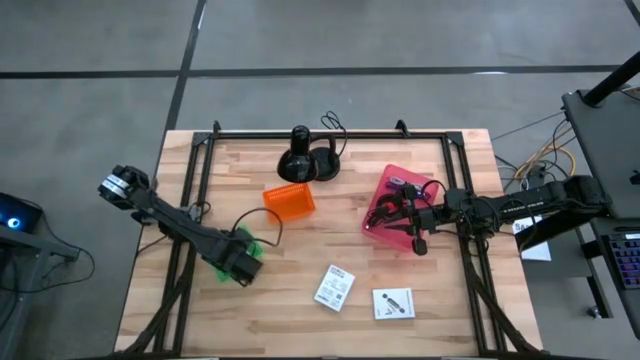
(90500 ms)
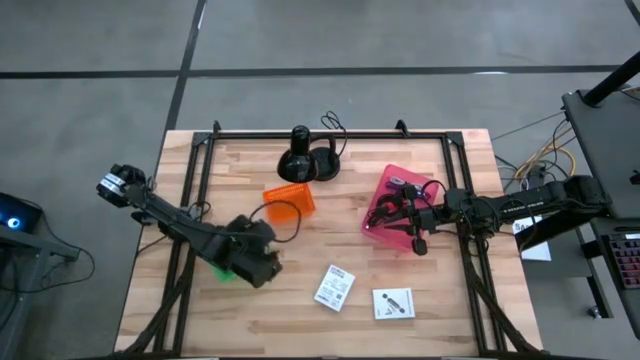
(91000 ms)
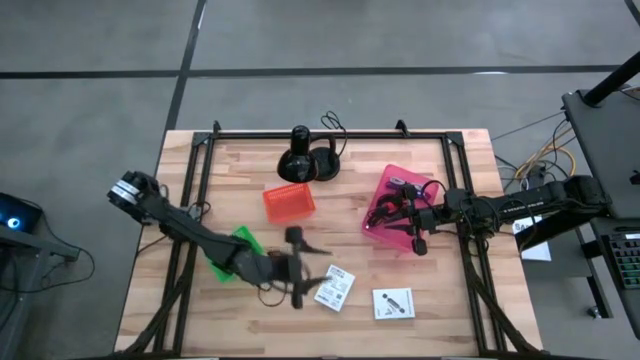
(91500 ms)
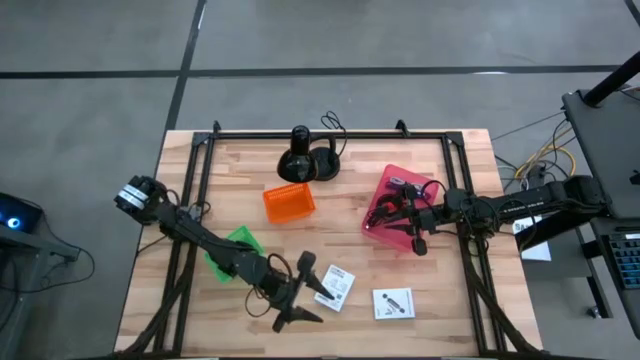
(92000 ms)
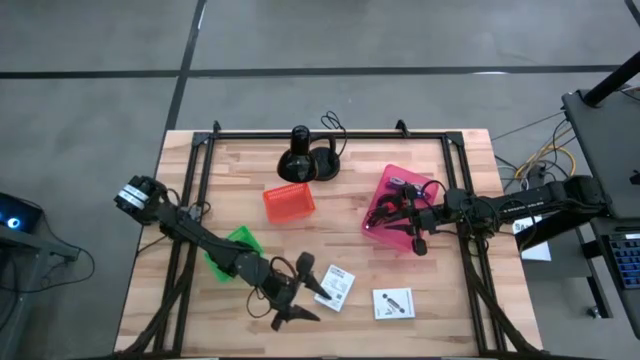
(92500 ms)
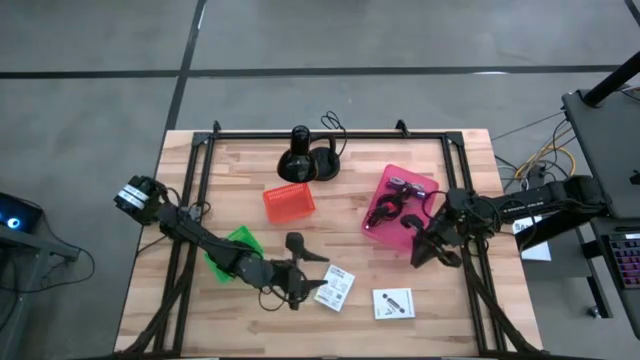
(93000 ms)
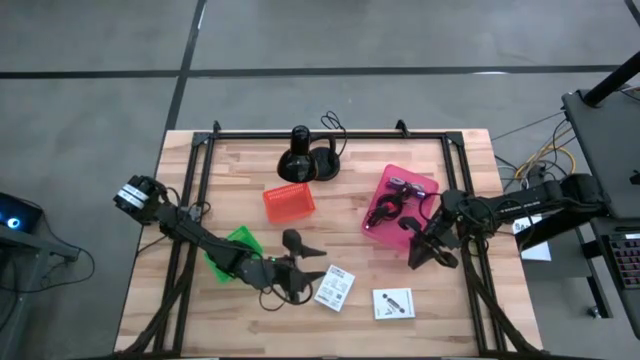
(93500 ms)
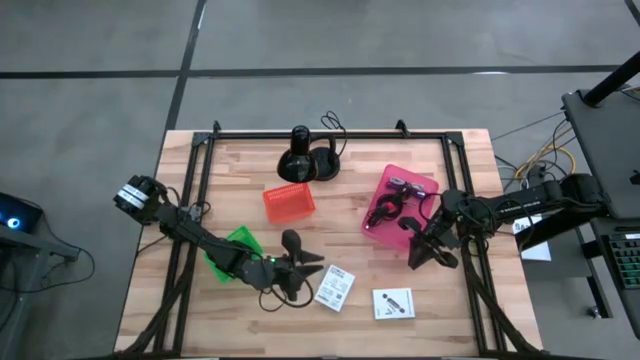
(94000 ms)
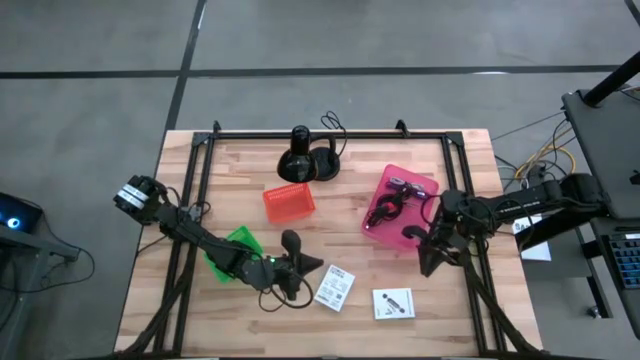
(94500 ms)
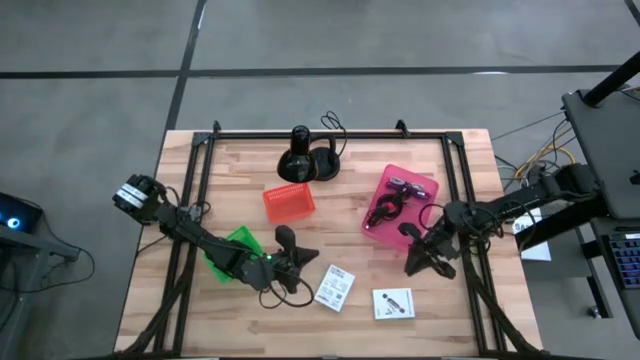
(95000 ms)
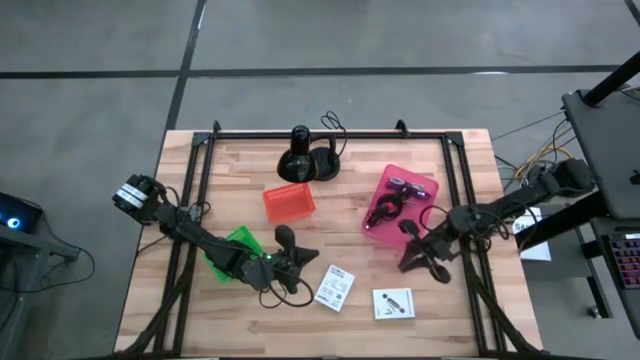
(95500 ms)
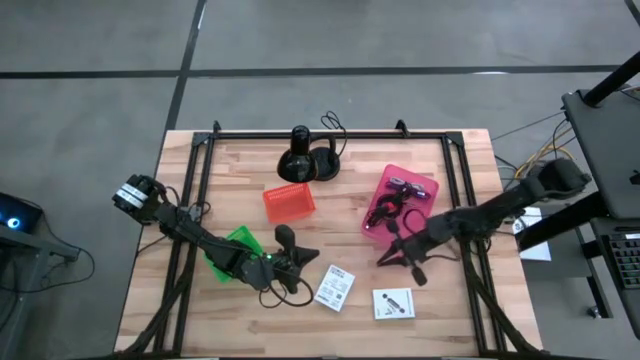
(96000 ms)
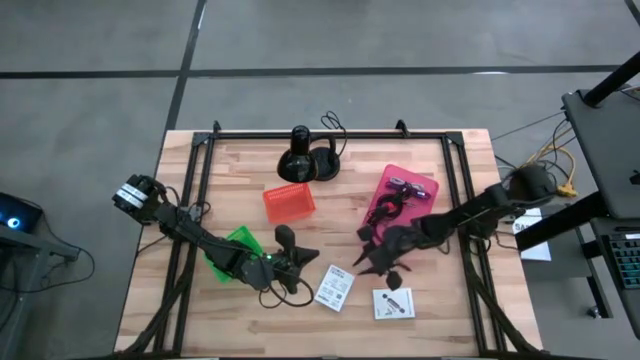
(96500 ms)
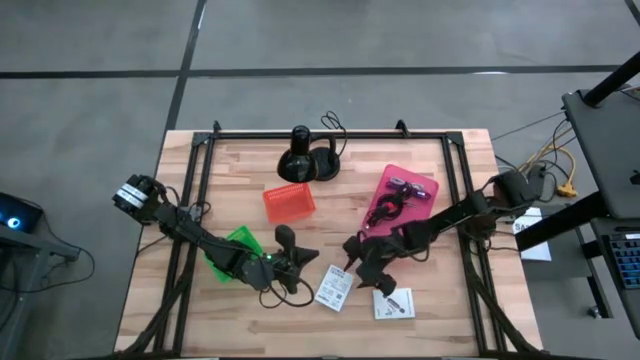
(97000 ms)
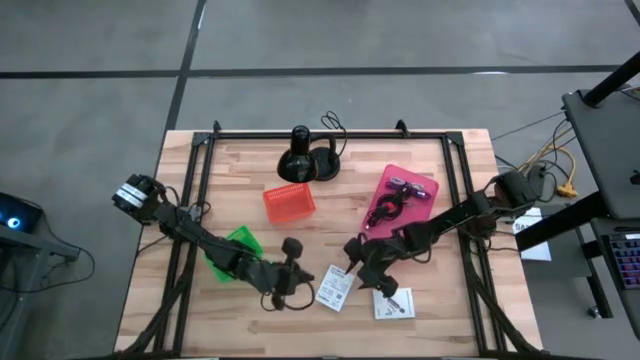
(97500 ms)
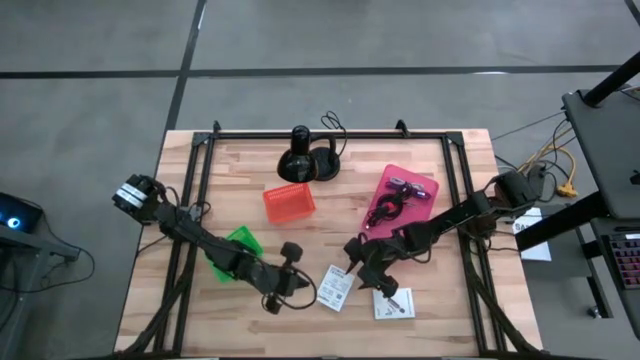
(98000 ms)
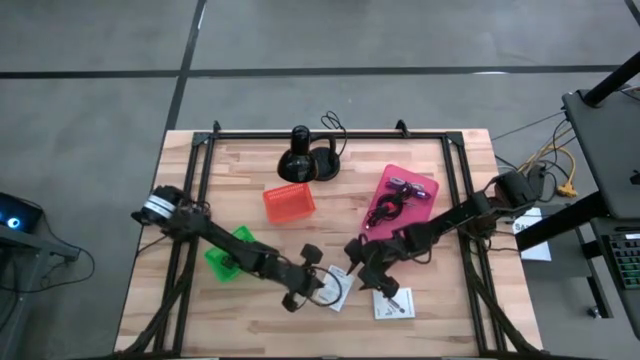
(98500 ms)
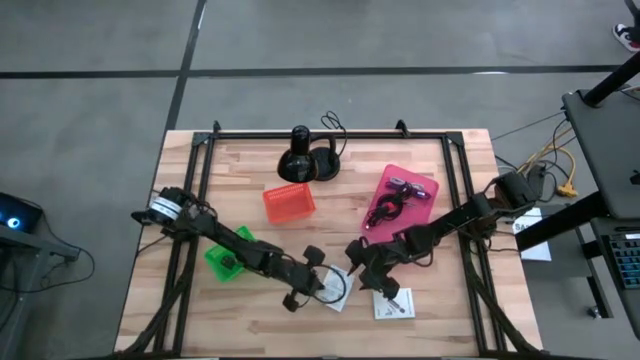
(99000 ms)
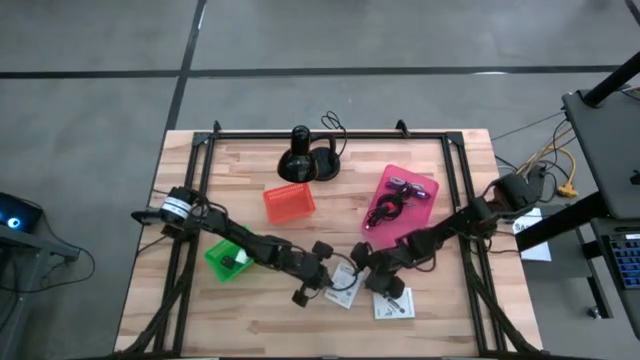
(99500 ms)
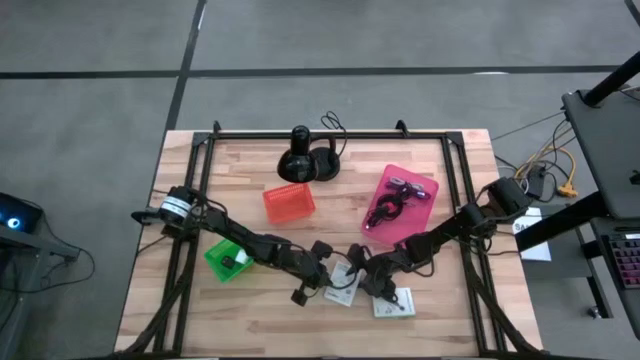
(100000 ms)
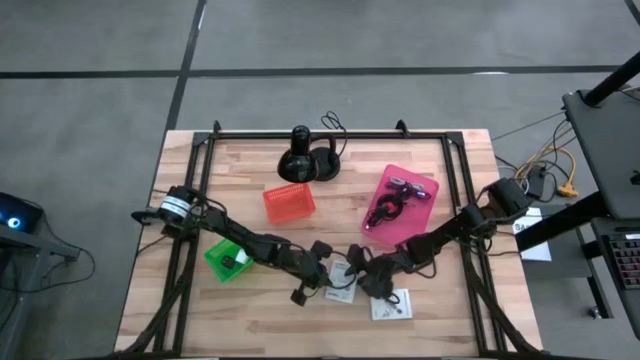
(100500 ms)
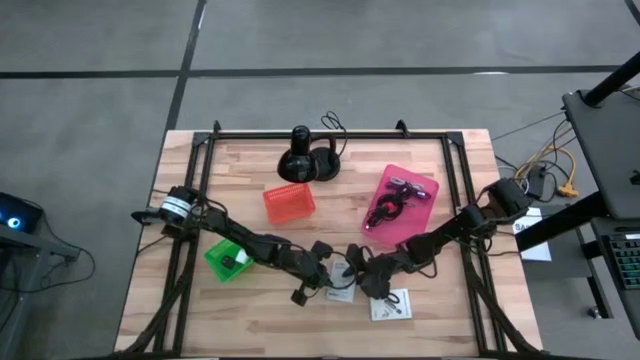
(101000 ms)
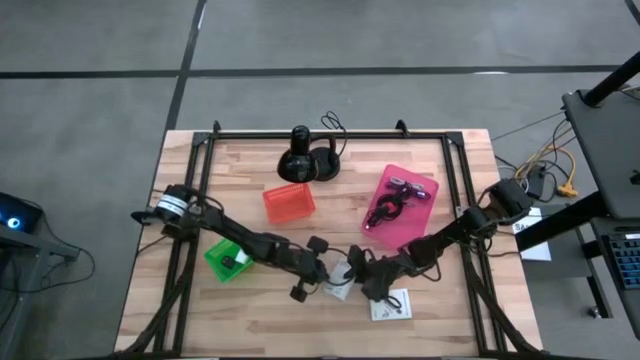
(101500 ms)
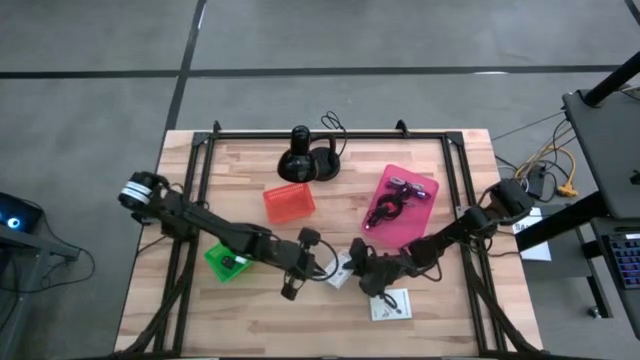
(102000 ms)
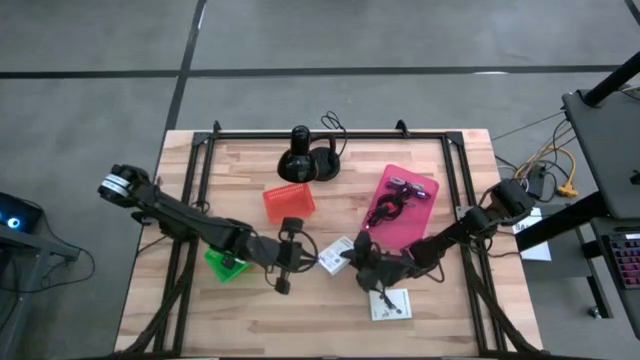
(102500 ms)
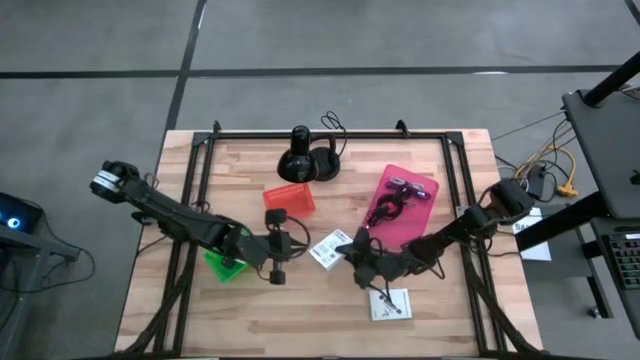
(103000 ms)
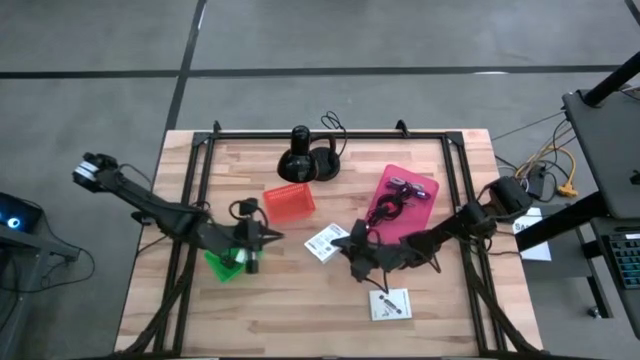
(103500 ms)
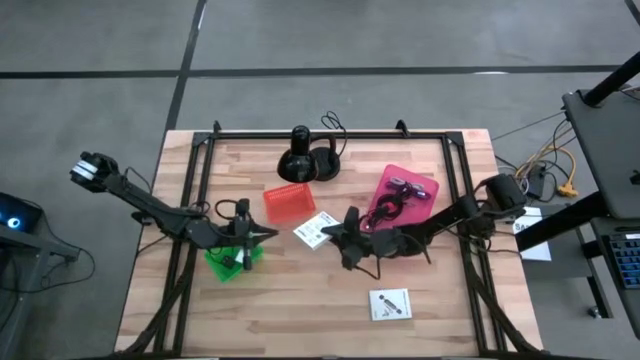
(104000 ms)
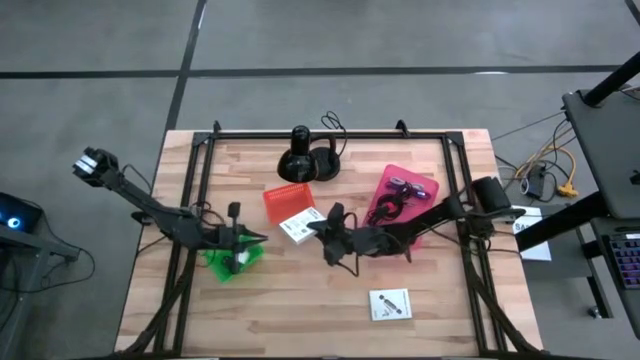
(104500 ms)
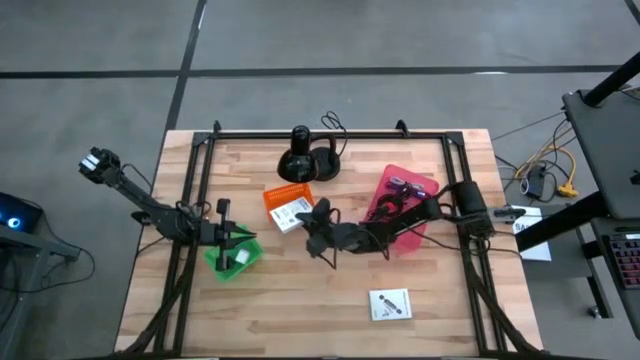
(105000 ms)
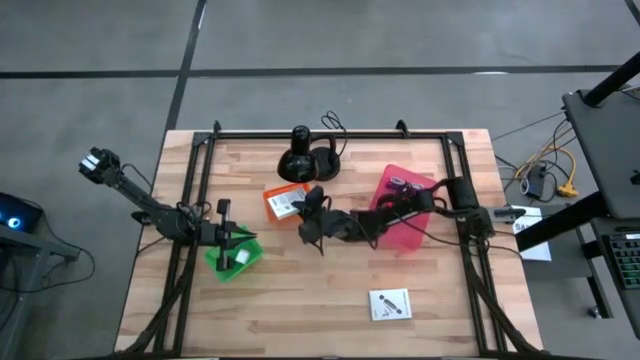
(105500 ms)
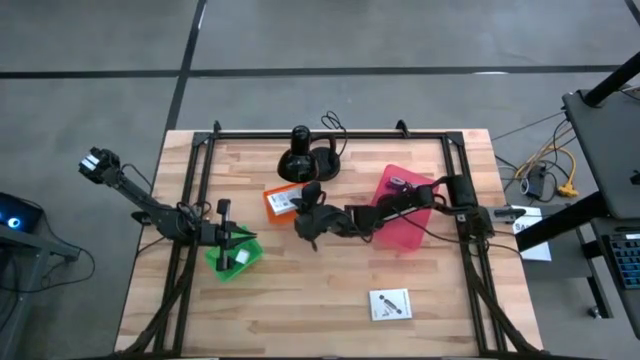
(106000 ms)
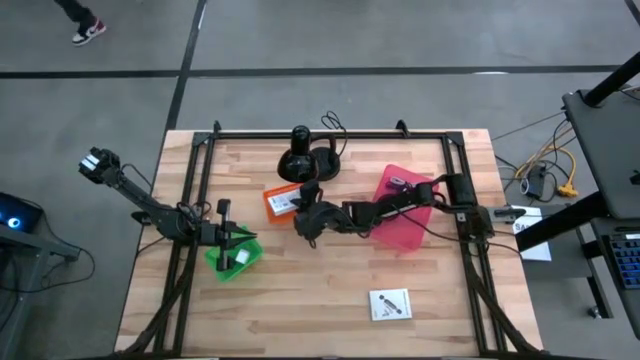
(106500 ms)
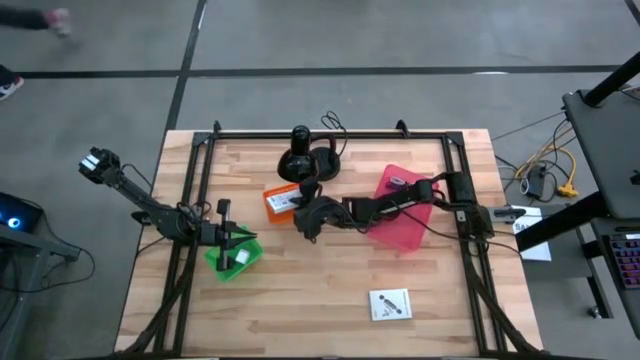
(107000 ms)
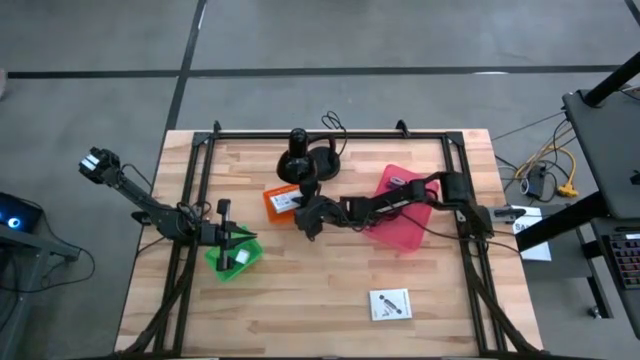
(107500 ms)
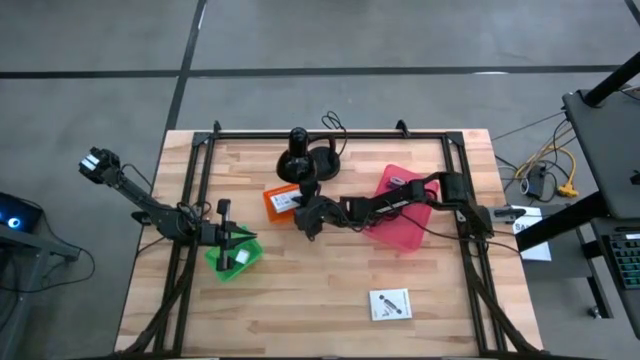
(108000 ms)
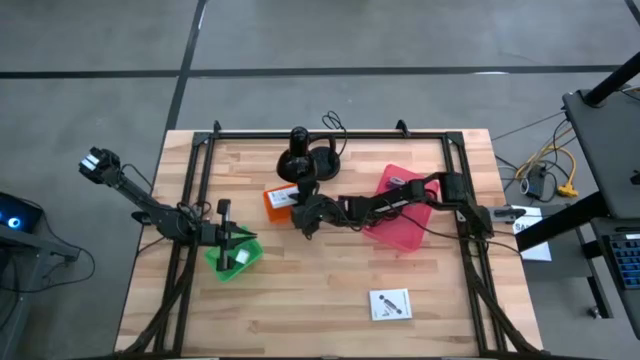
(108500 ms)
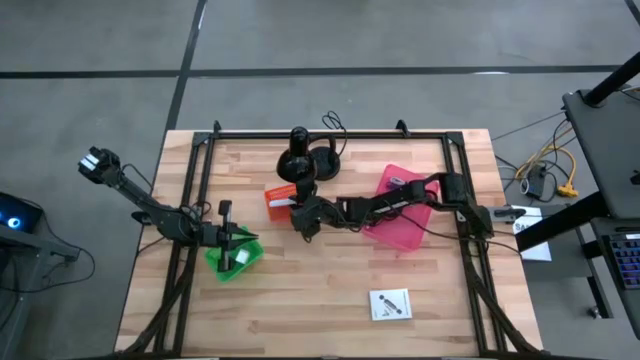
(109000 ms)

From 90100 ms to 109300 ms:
Task: Pick and place items into bin
Put the left card reader box into the orange bin
